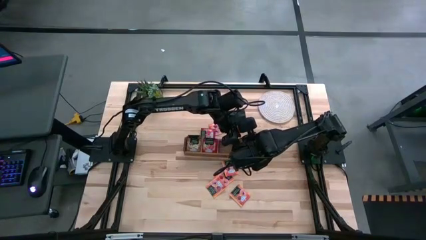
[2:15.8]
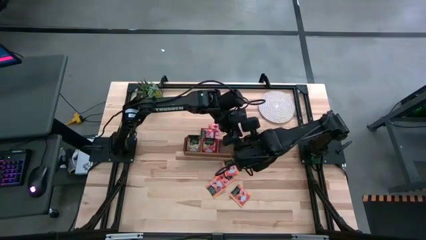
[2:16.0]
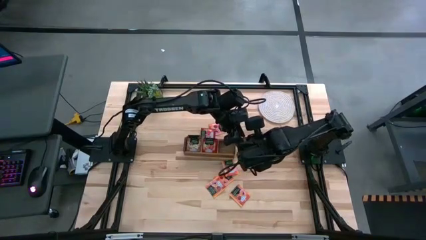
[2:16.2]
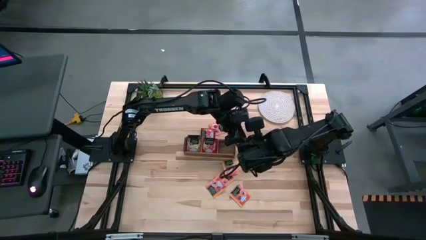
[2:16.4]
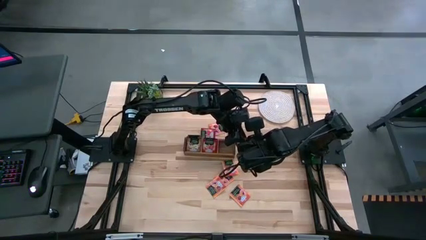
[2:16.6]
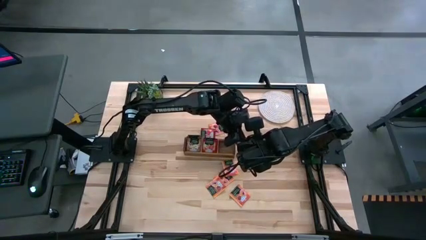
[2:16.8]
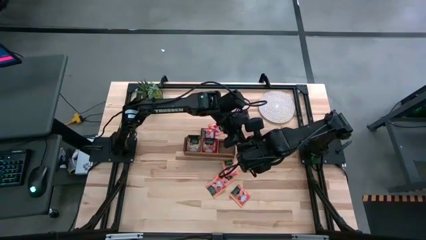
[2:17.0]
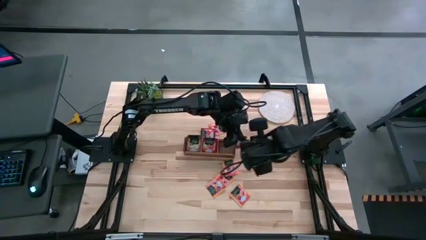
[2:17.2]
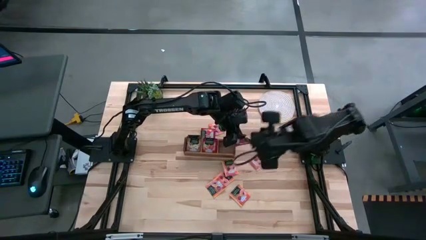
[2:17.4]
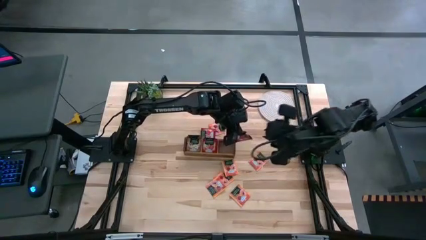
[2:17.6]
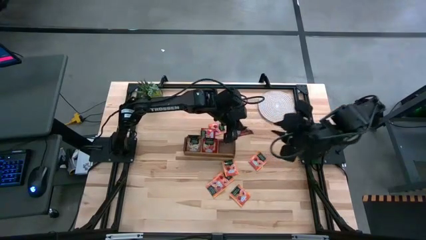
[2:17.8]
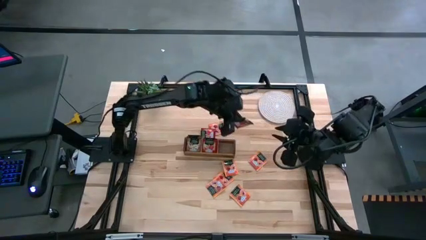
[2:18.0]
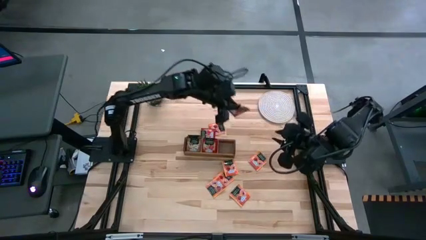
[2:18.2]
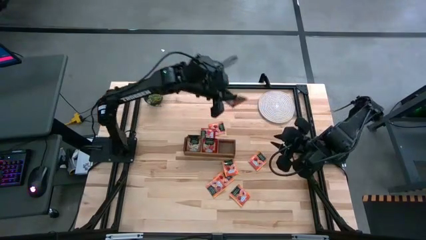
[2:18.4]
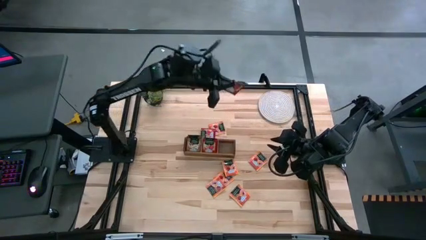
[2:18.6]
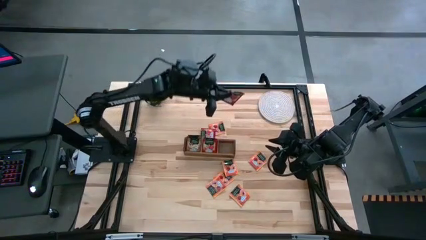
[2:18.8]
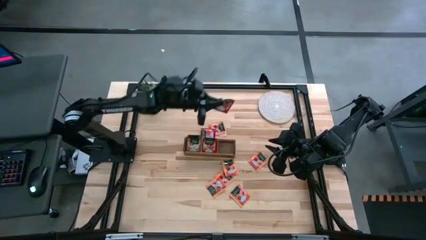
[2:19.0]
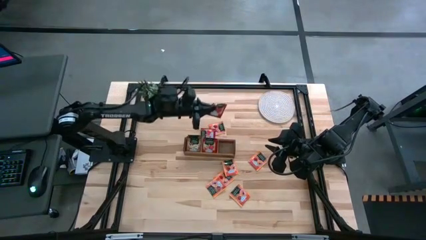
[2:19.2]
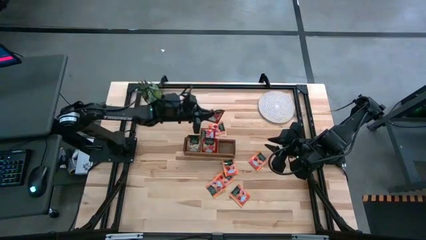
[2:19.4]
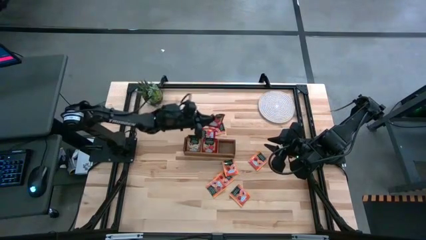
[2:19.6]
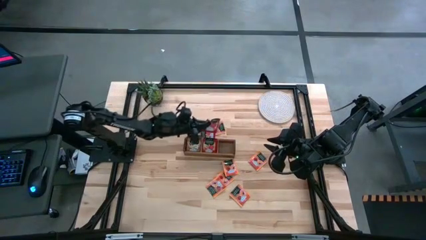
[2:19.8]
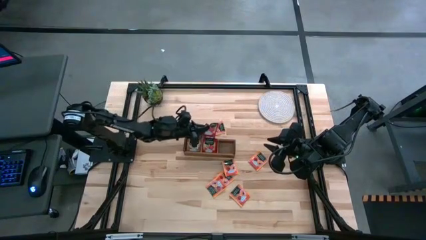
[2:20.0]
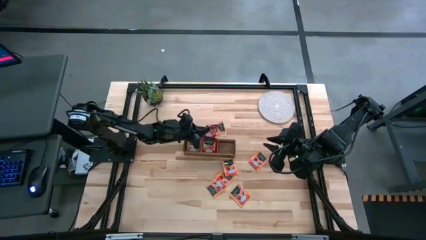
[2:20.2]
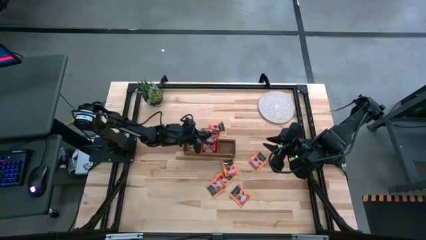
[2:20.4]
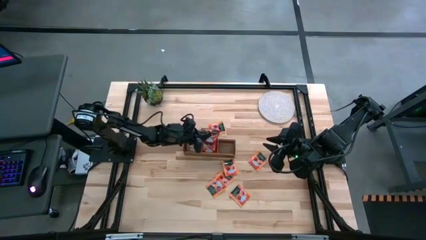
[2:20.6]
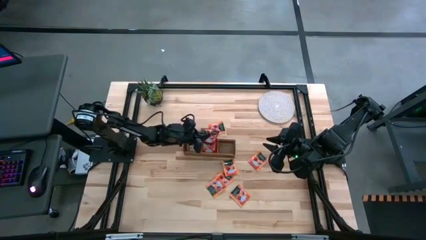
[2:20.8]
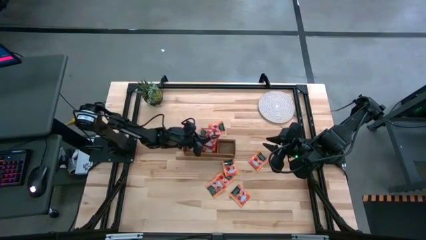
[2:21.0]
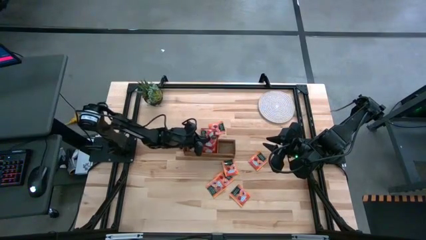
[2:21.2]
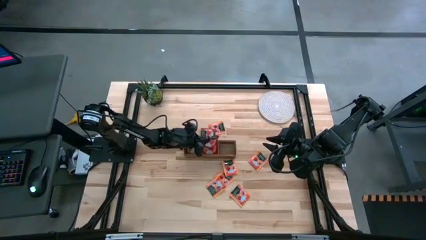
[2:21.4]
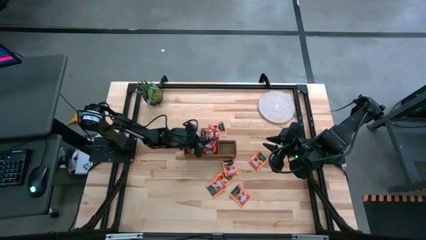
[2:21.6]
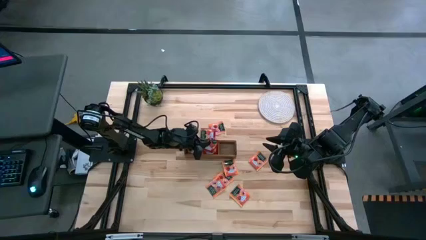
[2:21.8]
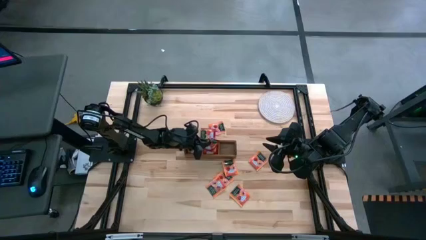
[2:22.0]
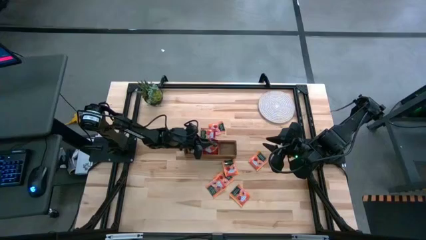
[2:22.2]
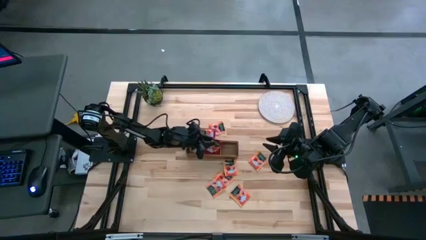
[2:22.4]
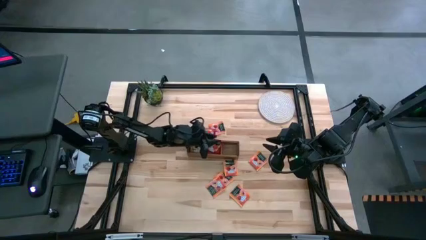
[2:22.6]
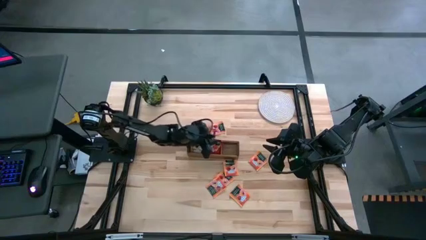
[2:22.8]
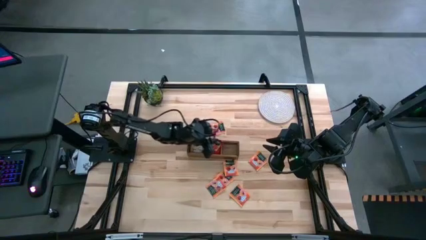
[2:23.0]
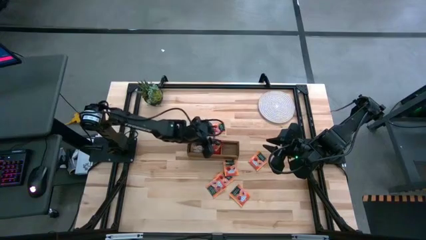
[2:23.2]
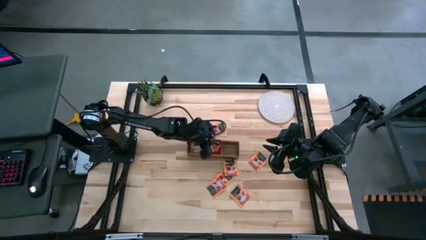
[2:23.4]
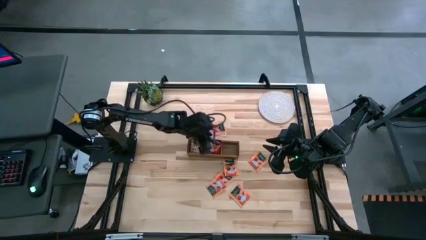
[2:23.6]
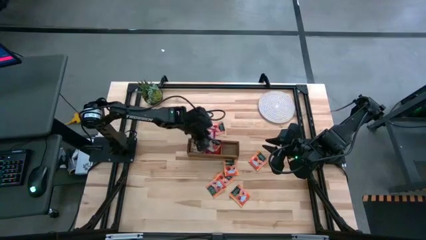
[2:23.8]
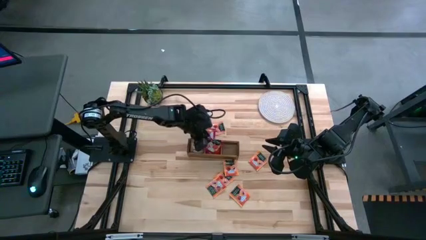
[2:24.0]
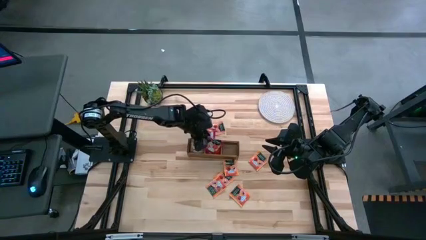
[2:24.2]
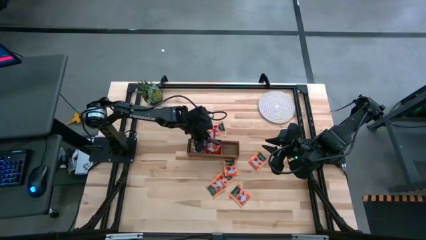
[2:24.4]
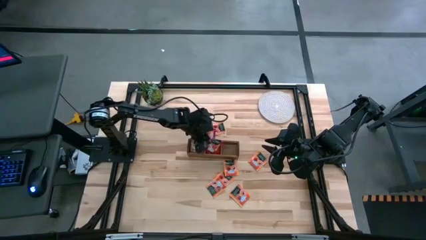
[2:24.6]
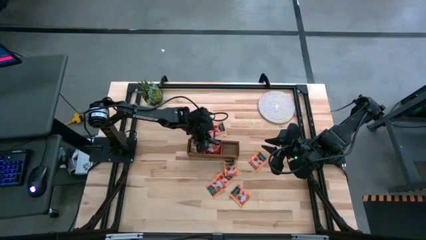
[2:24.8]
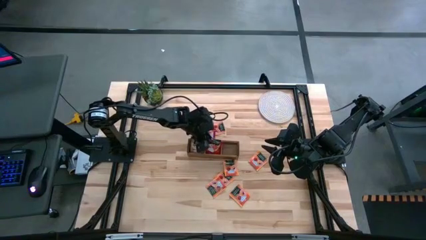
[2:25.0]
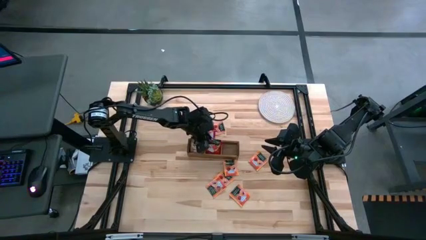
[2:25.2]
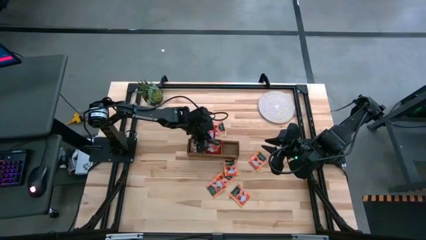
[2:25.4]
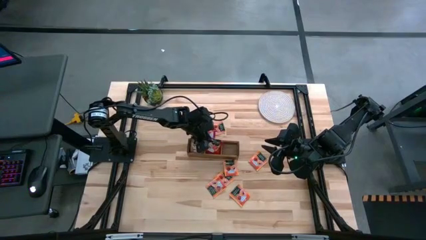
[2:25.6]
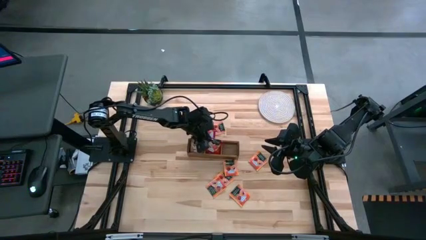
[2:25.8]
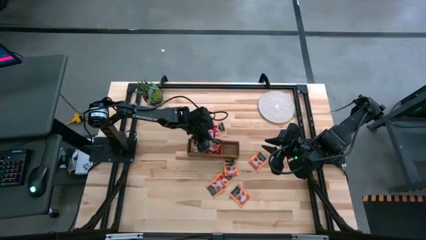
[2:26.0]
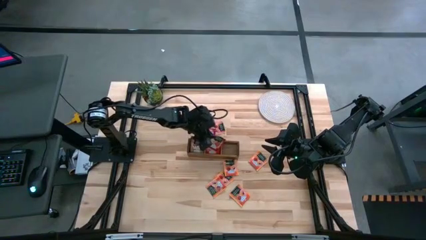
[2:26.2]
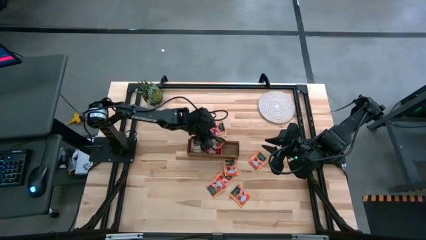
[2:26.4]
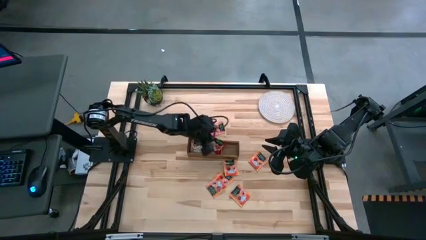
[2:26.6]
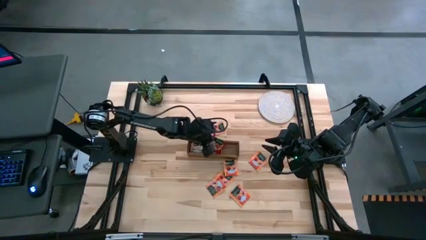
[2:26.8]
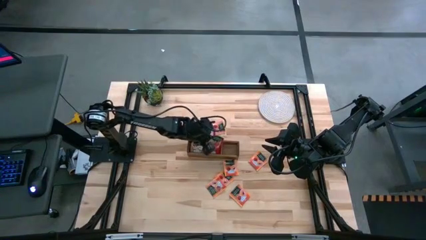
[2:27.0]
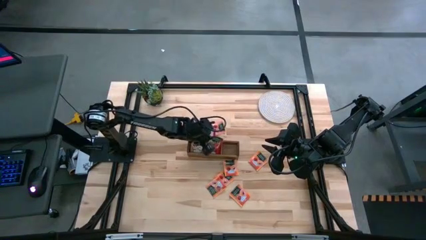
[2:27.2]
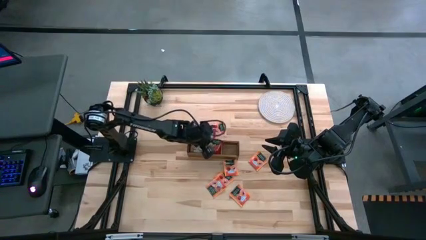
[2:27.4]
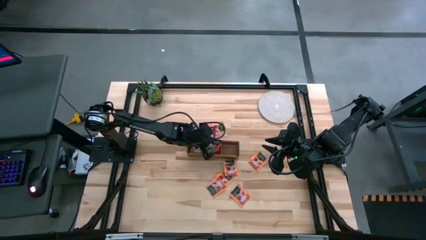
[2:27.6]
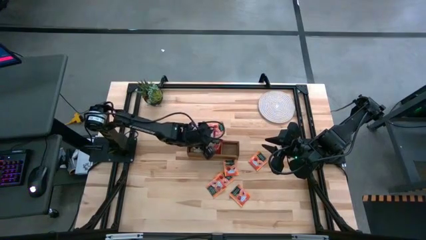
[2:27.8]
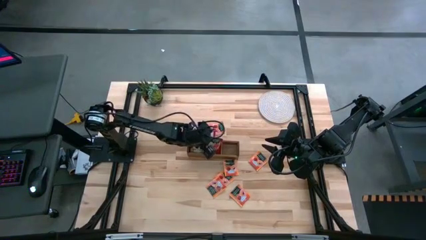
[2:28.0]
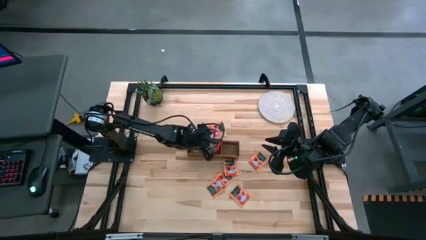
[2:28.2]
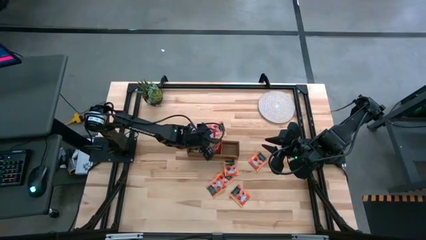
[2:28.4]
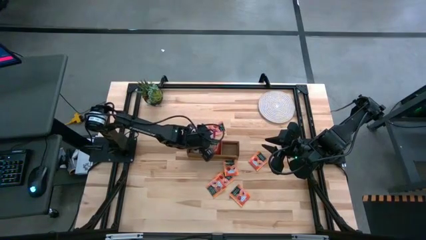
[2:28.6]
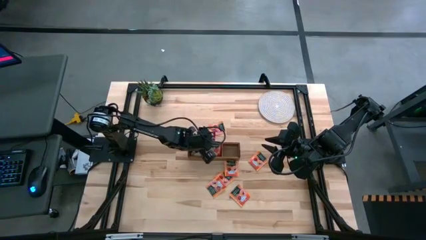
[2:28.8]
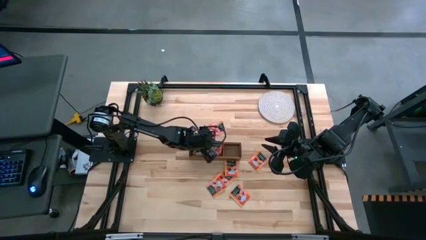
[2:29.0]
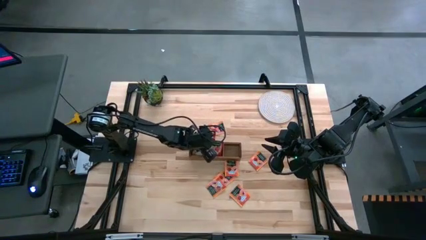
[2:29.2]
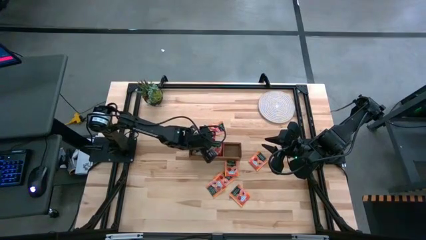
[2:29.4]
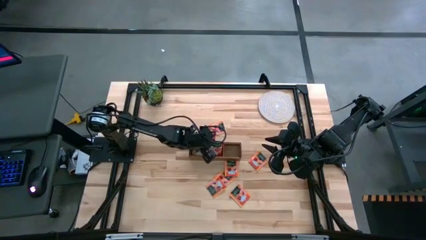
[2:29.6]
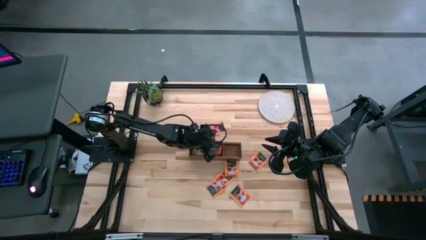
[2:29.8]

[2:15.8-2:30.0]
Task: Pick & Place Tea
Put the red tea bag into the middle section of the brown wooden organizer
